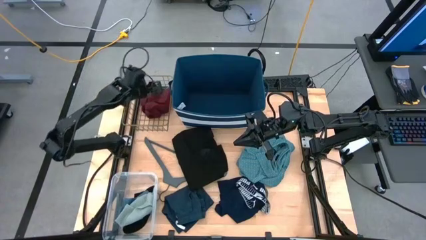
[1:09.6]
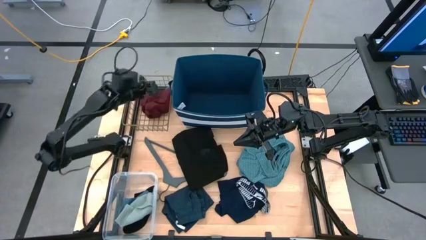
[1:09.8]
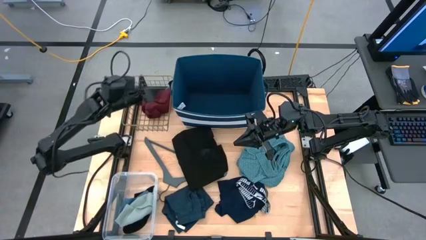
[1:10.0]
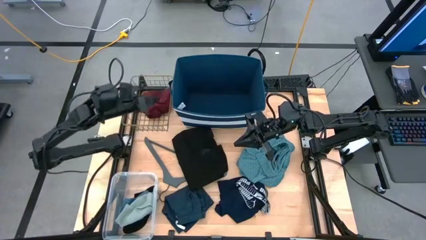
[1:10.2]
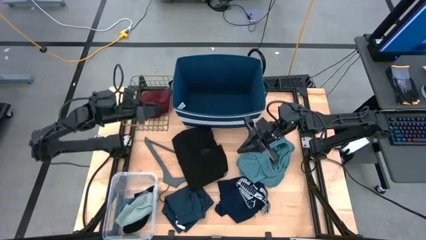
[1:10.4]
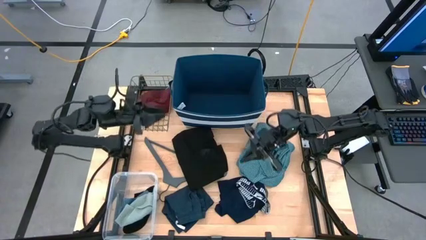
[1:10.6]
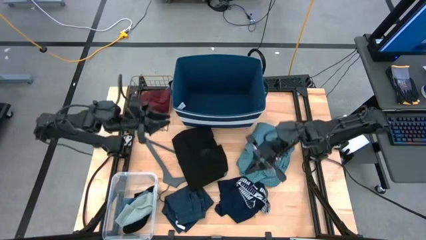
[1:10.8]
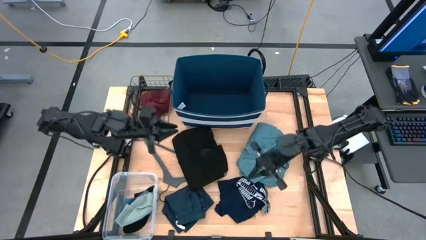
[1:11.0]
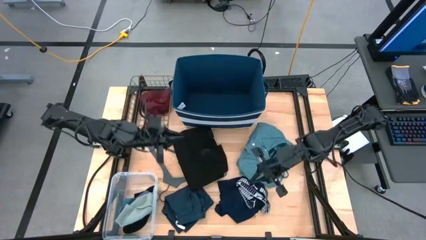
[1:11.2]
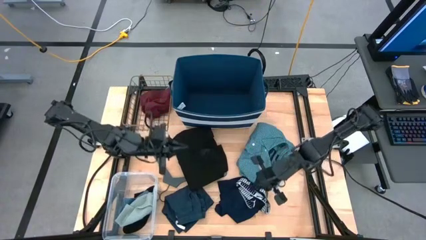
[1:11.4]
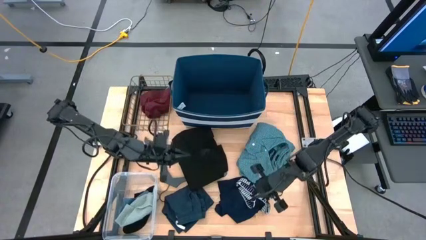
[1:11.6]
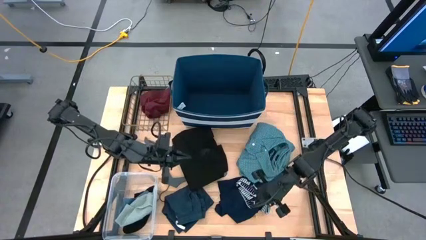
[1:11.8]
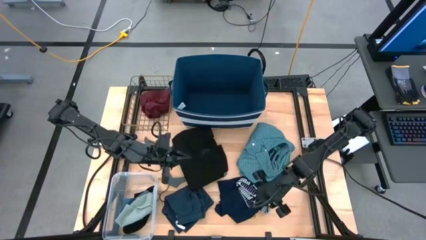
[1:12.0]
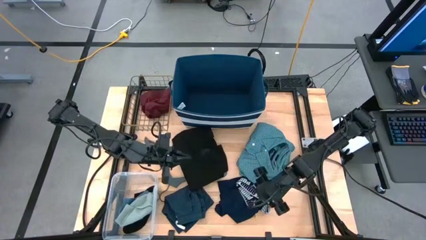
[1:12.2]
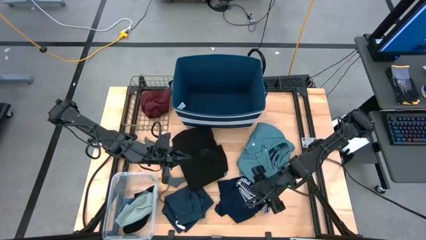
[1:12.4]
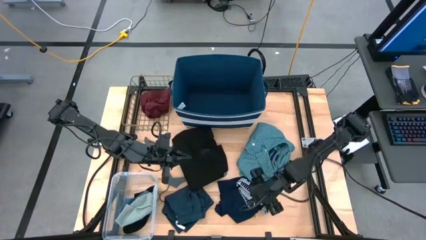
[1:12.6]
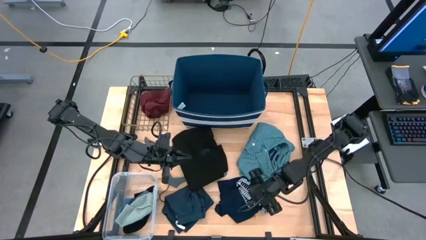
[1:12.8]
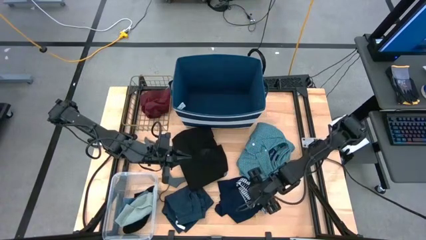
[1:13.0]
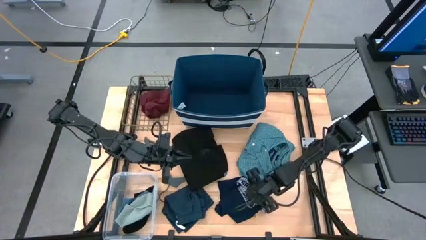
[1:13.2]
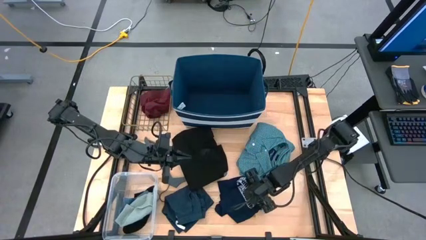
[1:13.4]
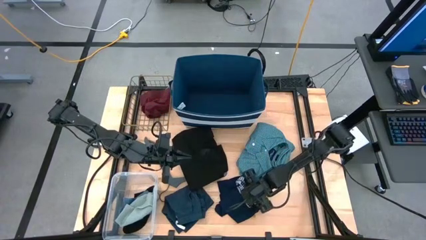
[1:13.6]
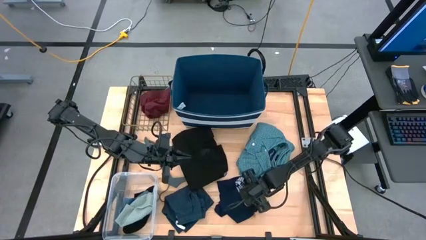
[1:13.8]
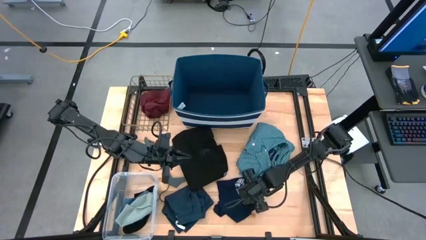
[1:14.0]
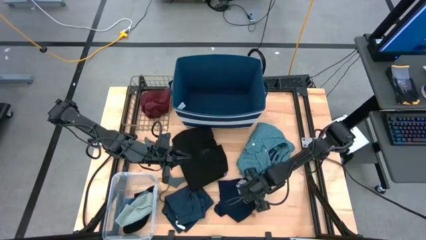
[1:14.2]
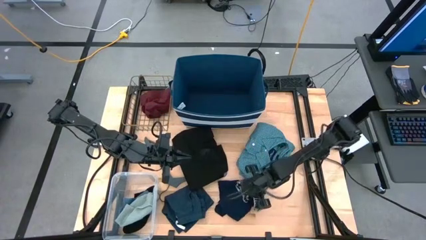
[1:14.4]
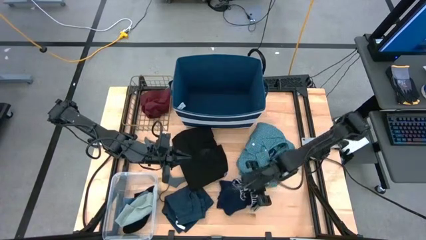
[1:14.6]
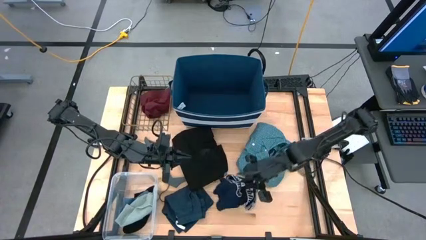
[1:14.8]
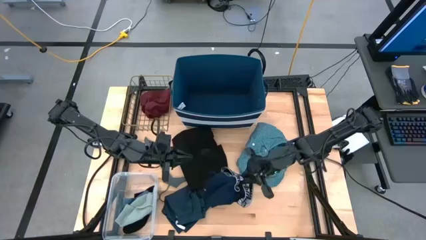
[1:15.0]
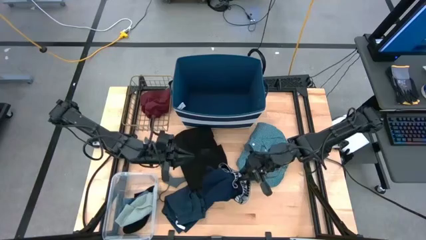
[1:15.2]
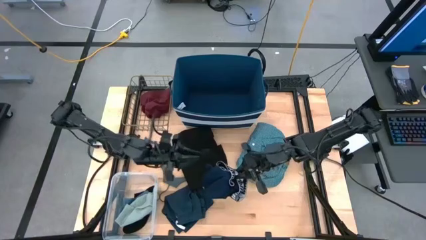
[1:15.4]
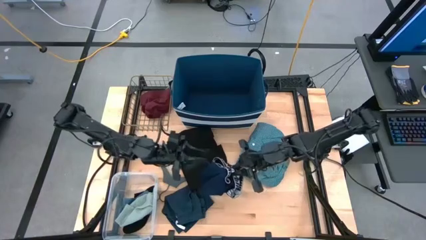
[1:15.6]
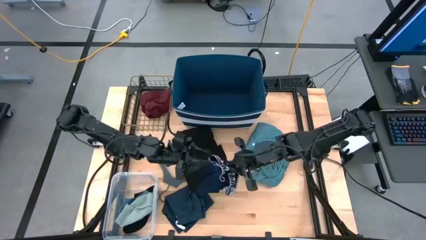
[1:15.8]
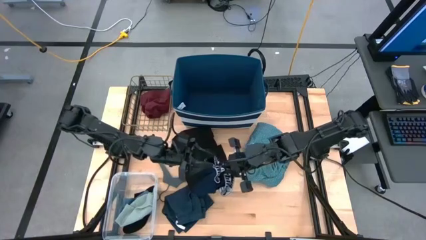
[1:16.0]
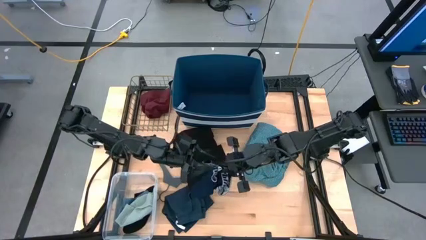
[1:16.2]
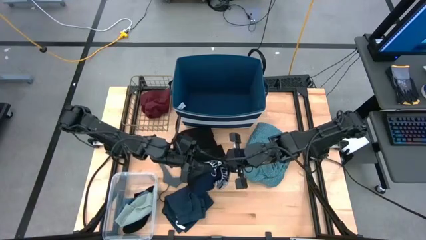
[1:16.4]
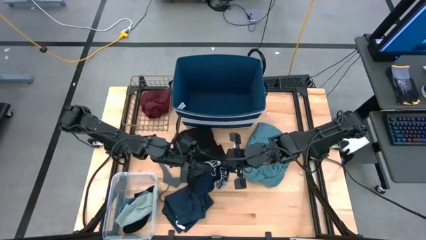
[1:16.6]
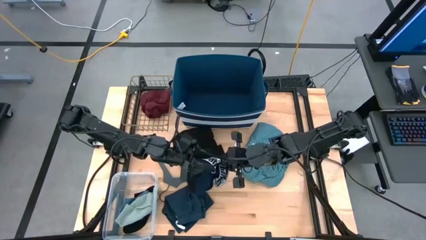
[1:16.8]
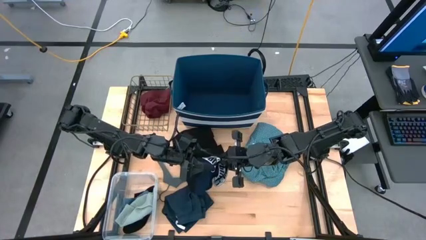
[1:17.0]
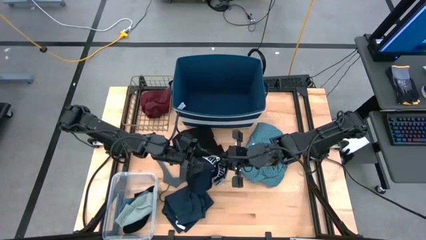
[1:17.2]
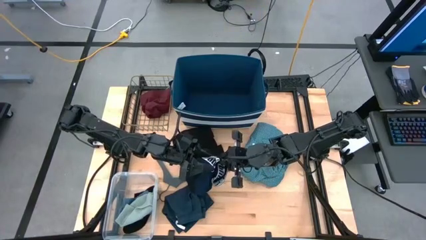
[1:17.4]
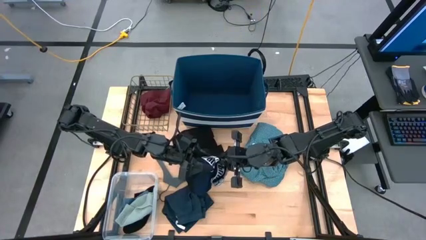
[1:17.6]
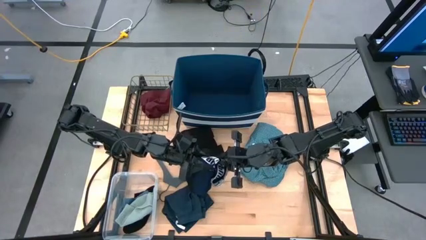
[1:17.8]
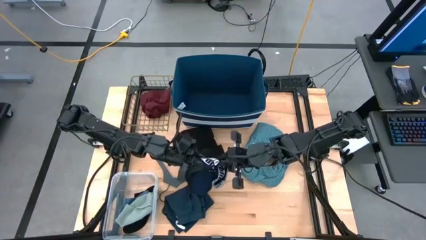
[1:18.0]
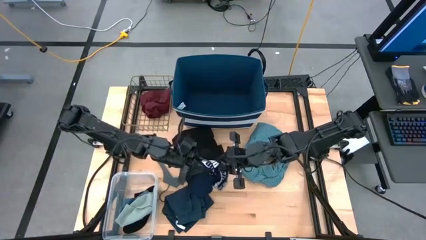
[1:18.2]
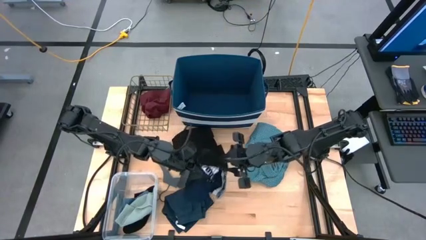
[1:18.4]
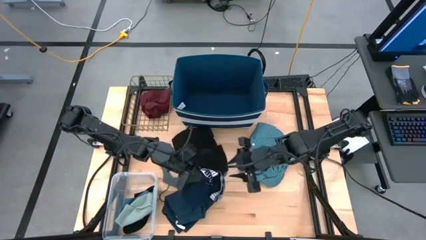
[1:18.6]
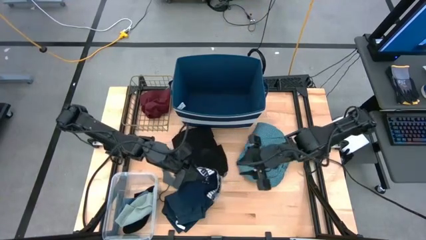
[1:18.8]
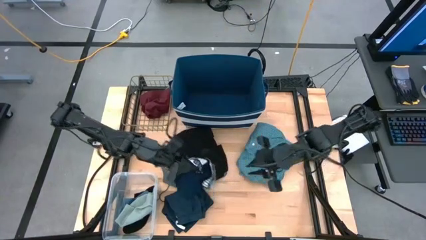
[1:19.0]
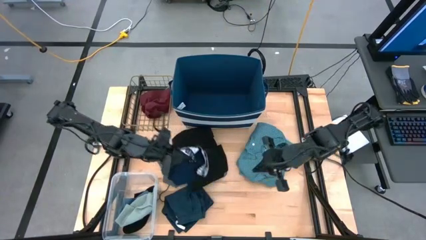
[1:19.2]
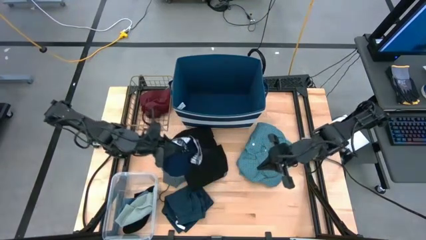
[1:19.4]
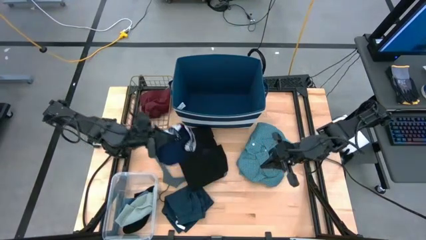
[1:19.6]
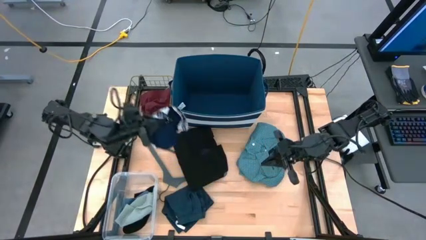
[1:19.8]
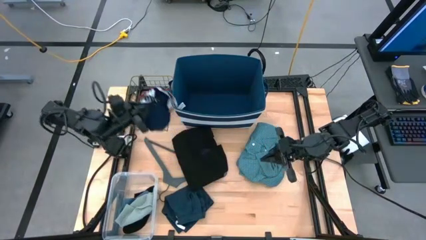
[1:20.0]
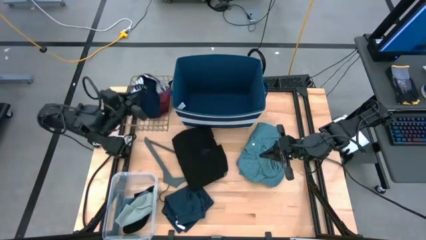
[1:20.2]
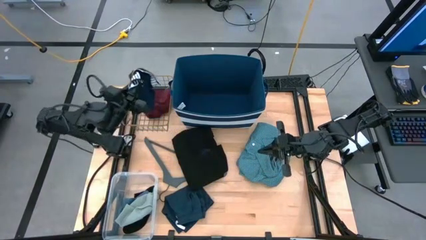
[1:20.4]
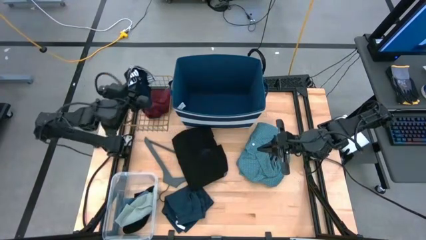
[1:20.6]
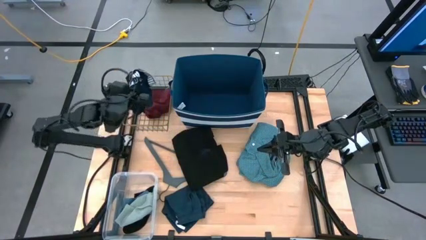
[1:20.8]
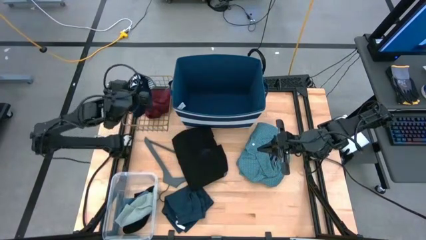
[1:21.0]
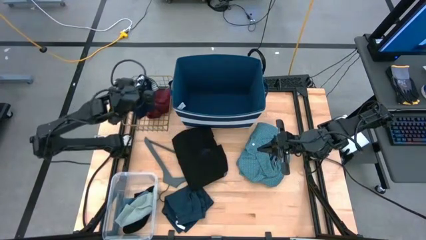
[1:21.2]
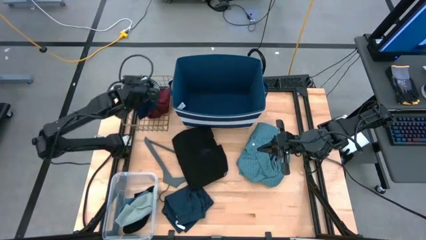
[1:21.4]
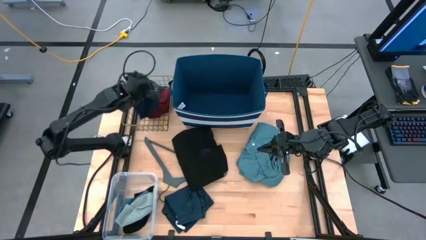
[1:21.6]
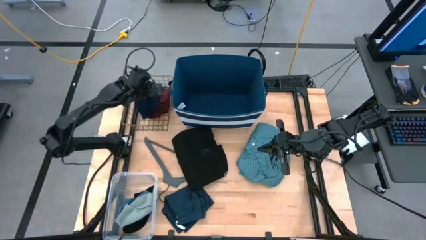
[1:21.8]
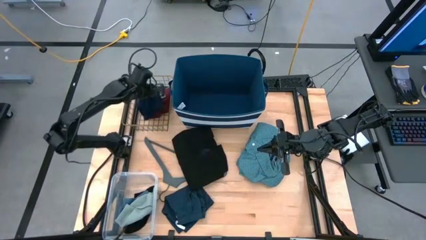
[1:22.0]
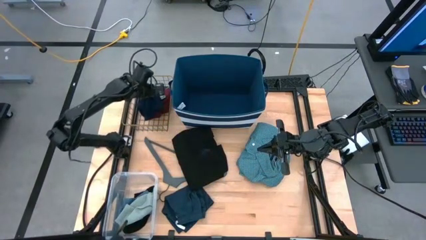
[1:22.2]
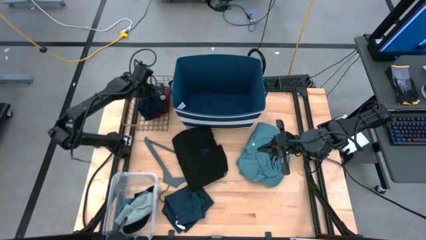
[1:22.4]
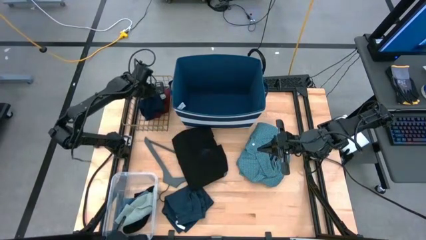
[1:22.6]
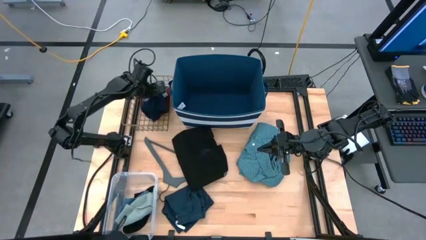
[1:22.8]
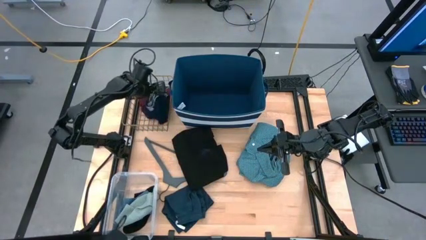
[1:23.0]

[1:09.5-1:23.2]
Task: Pick & Place Cloths
Put the blue underwear into the gold wire basket
